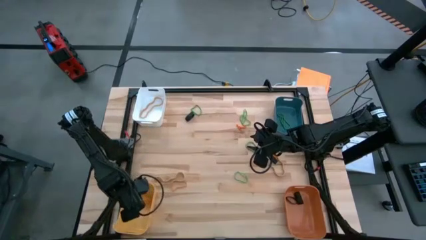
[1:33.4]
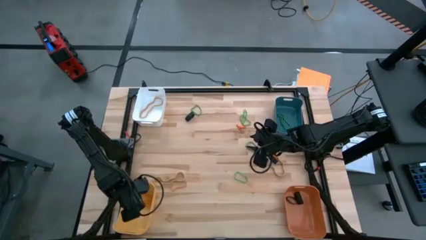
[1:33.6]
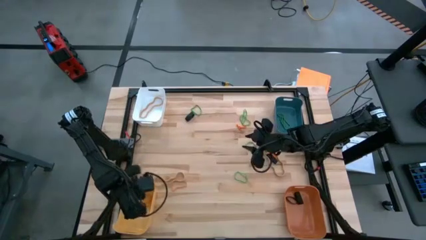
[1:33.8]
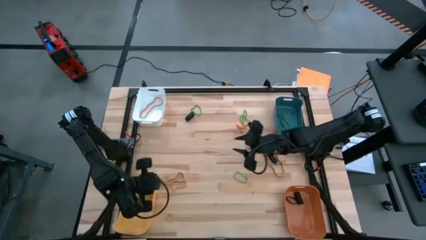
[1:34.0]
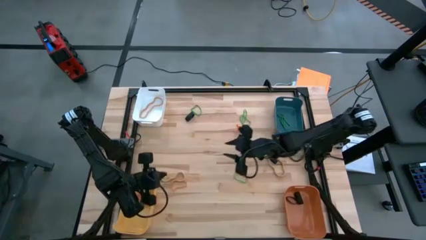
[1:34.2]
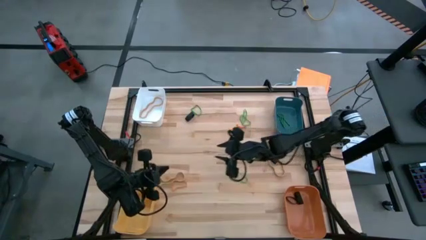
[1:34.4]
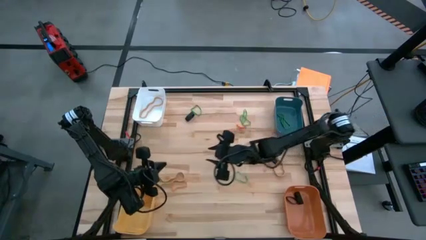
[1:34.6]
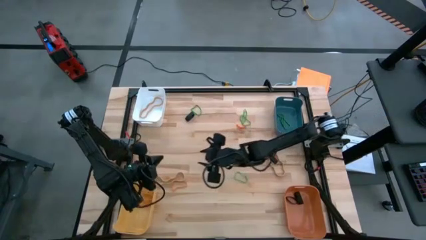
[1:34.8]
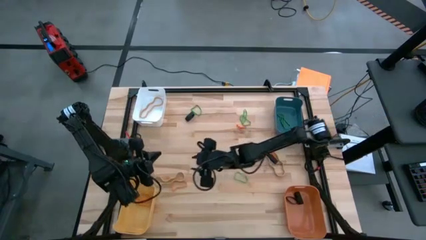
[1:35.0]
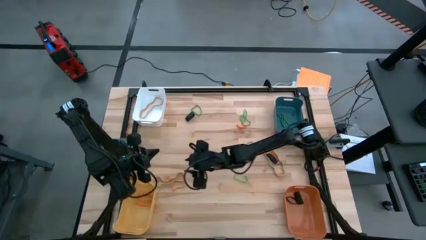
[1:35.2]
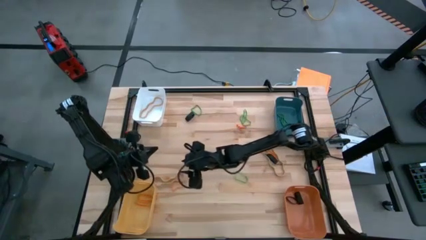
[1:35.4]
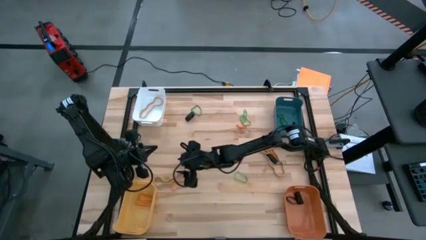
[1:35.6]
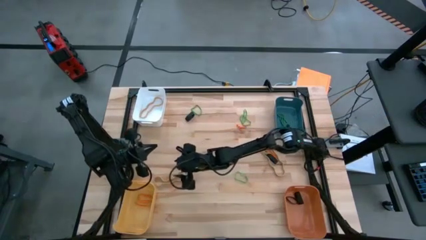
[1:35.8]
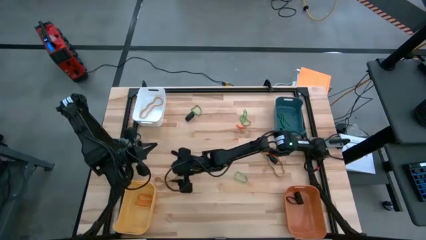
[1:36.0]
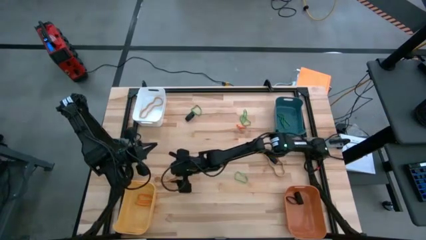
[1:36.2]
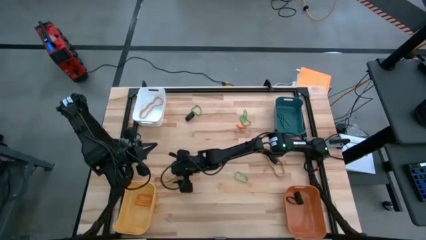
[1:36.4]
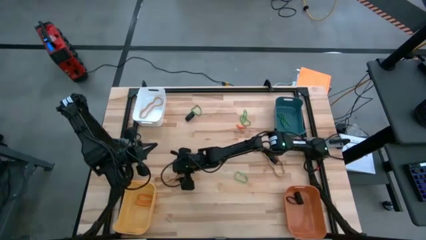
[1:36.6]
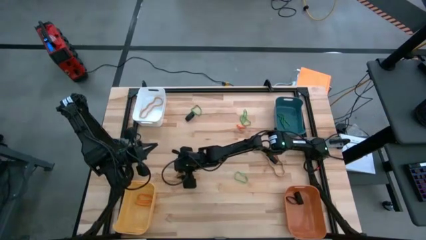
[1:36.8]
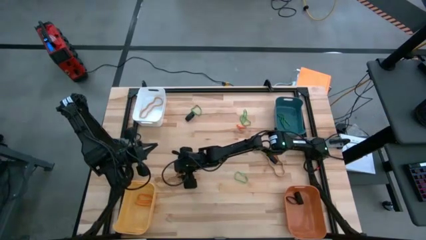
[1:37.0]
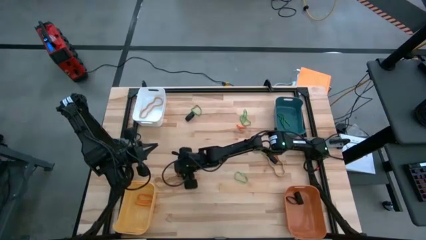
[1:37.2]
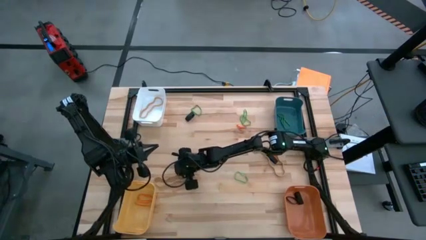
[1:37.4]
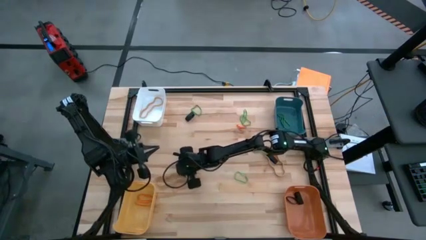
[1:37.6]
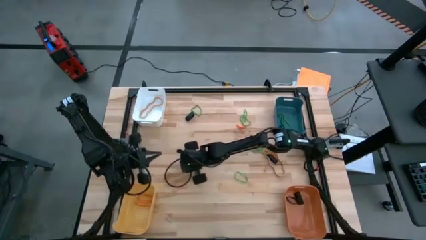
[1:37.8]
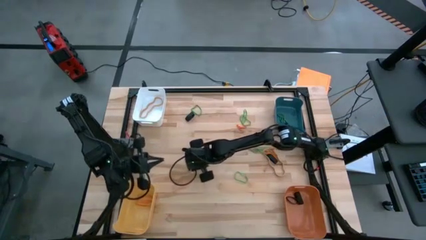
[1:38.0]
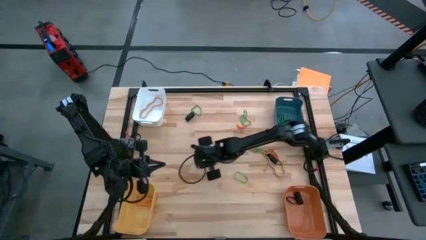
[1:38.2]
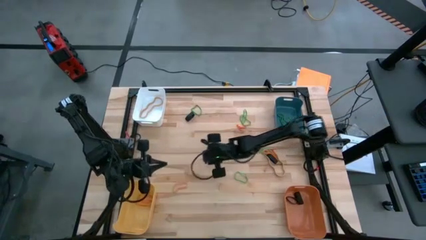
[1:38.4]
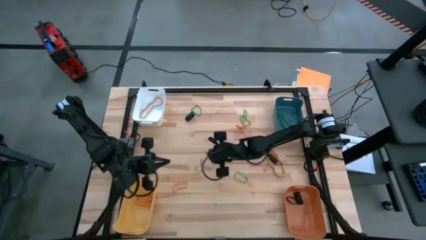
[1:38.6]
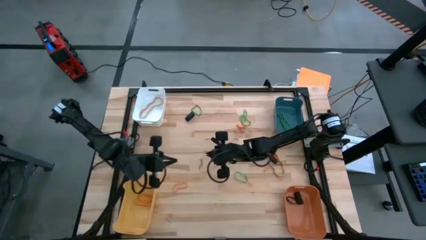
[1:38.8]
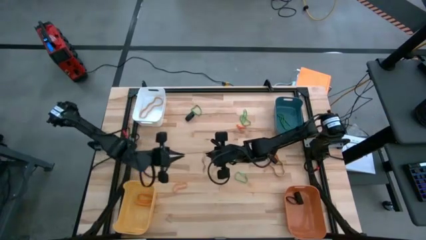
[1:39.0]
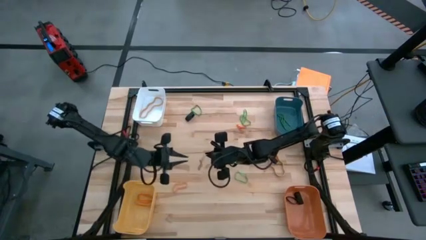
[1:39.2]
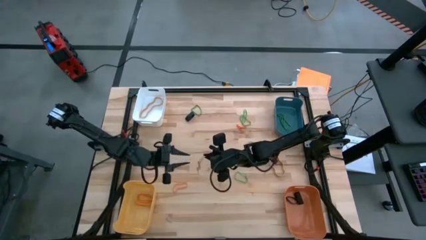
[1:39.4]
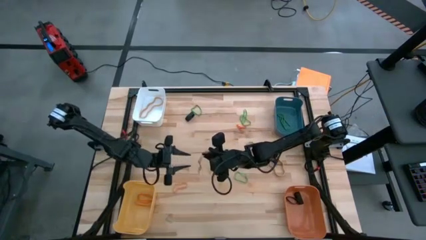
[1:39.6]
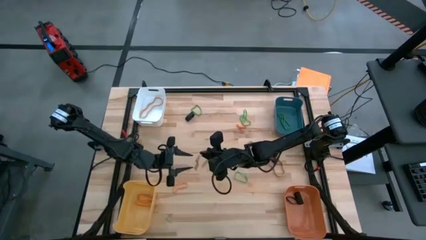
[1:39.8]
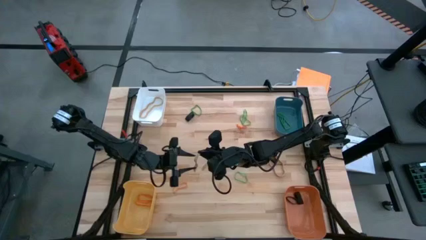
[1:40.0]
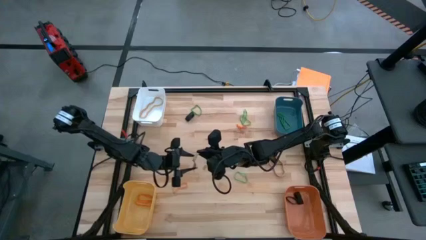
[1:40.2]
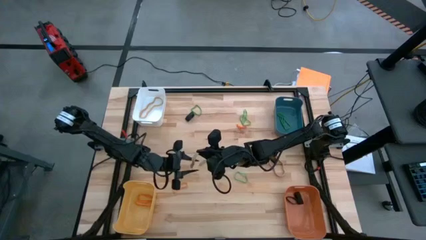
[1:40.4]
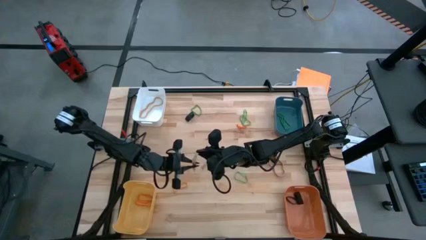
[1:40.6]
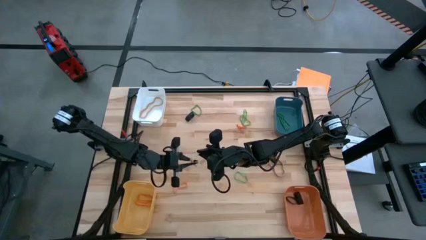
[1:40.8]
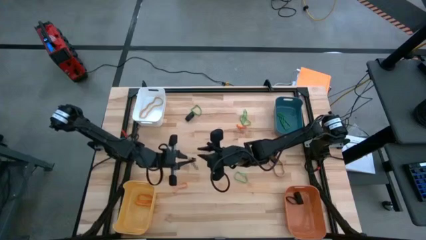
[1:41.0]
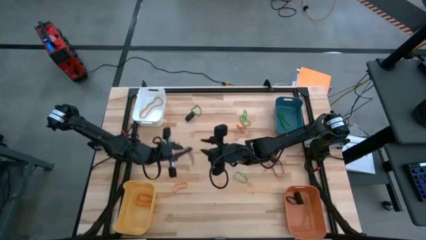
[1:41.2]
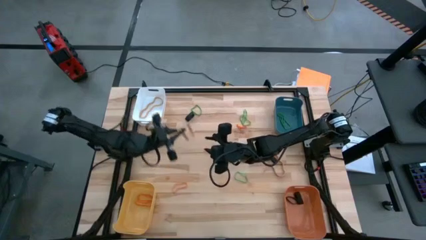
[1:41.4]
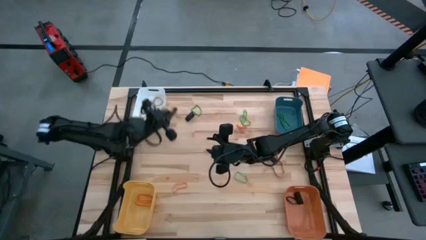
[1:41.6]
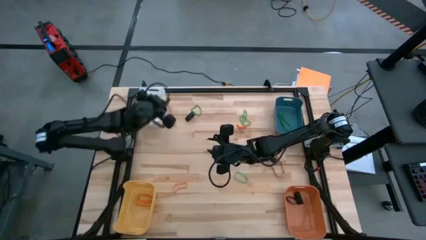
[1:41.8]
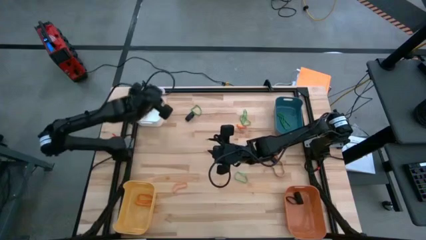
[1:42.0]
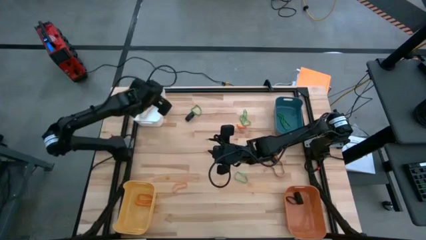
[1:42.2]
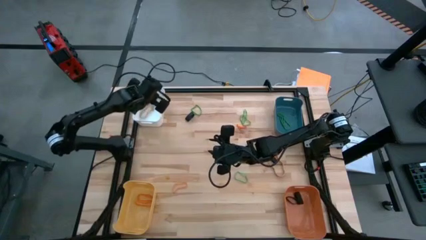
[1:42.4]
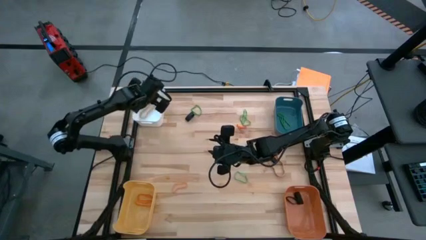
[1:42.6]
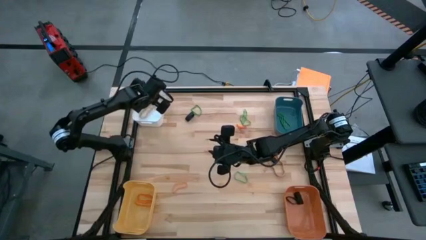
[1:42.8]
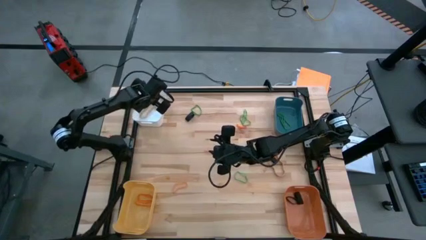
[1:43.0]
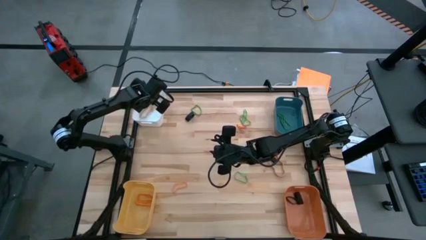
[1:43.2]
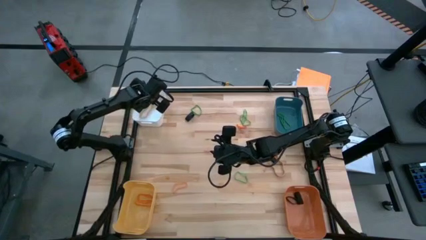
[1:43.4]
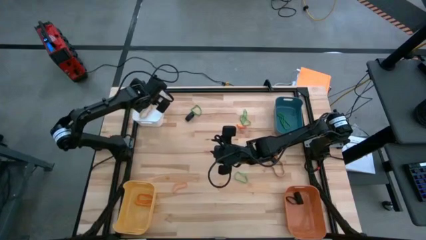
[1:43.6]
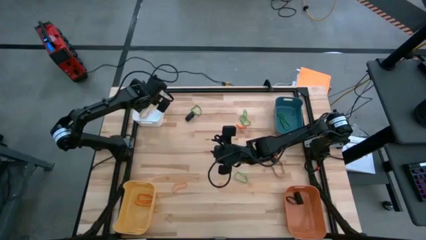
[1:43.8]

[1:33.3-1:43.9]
Task: Sort rubber bands into baskets
Put the brown rubber band into the white bin

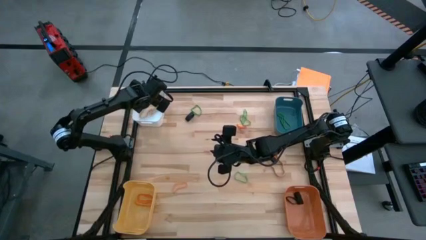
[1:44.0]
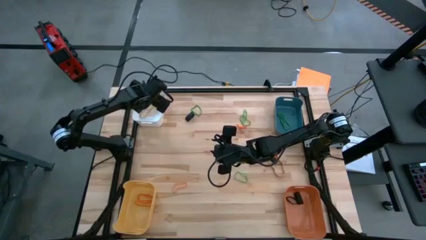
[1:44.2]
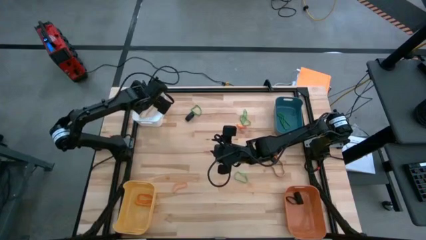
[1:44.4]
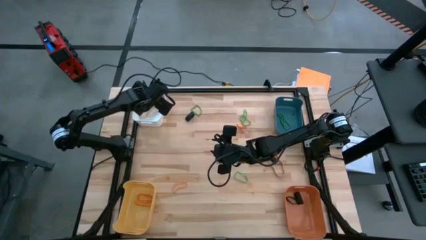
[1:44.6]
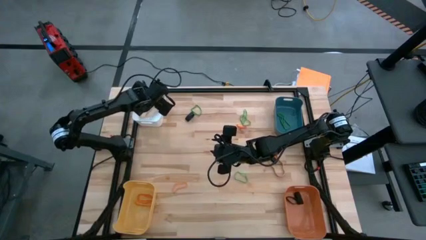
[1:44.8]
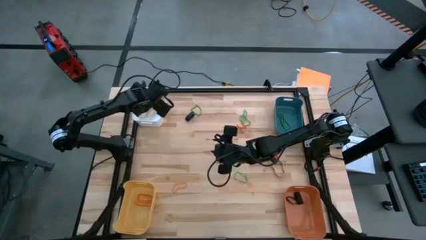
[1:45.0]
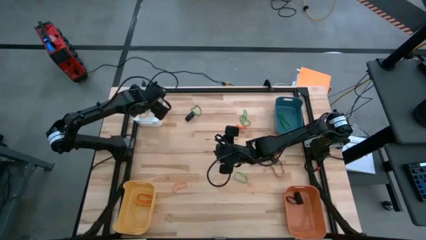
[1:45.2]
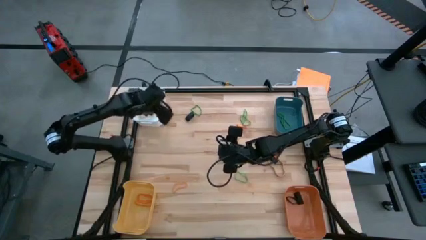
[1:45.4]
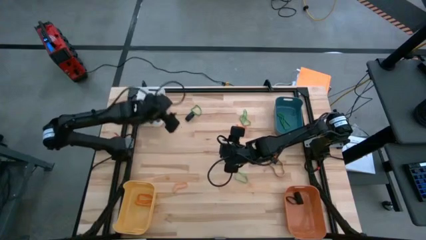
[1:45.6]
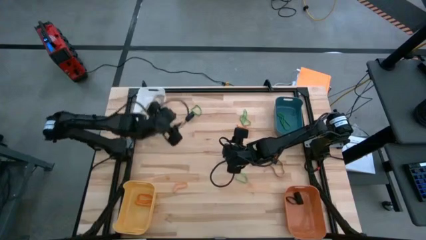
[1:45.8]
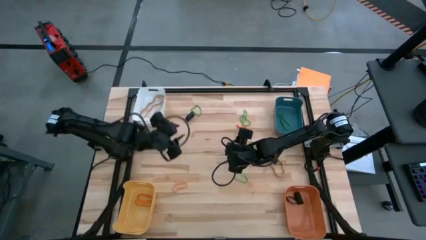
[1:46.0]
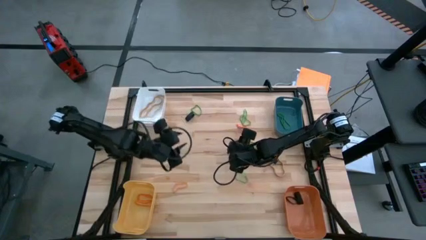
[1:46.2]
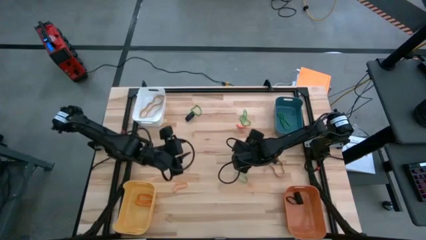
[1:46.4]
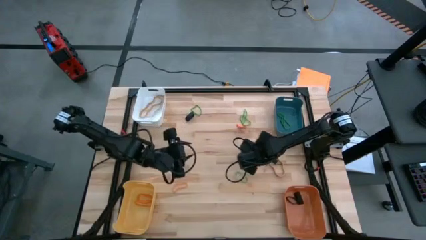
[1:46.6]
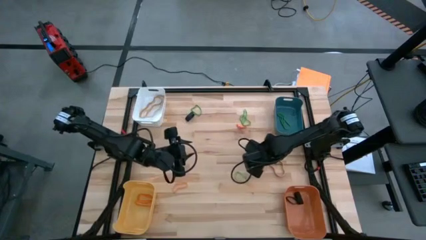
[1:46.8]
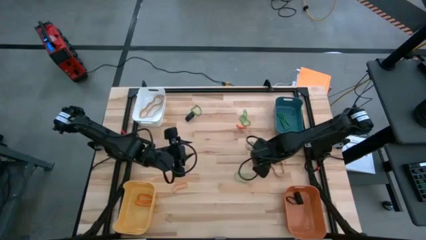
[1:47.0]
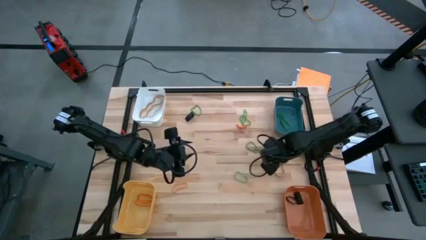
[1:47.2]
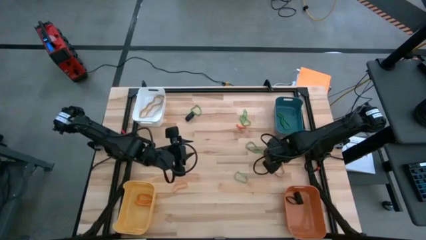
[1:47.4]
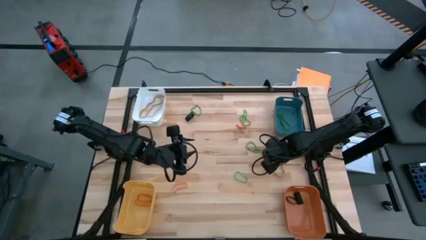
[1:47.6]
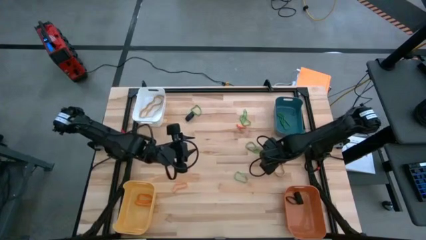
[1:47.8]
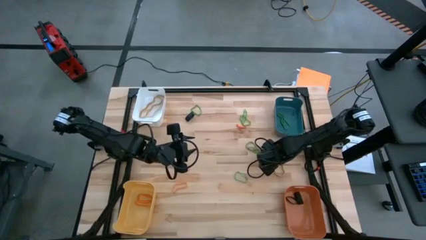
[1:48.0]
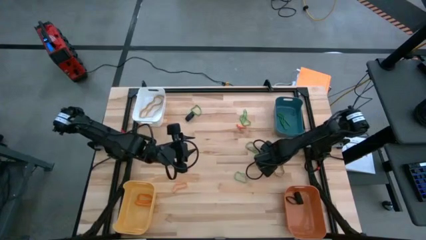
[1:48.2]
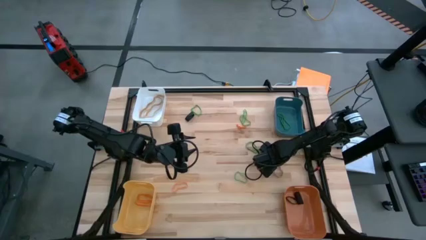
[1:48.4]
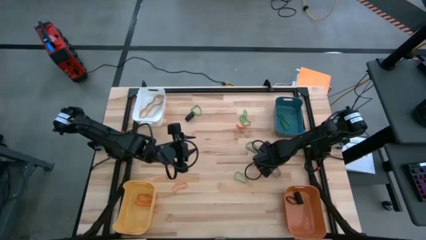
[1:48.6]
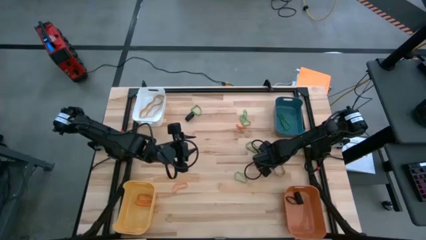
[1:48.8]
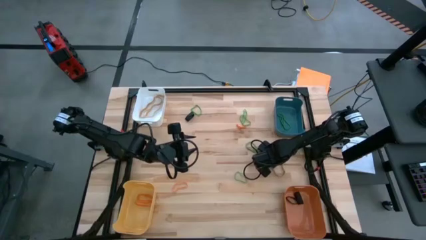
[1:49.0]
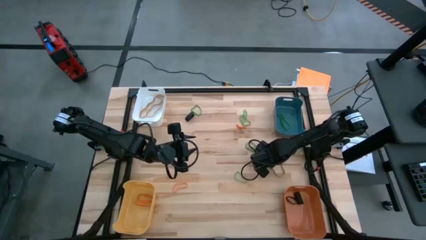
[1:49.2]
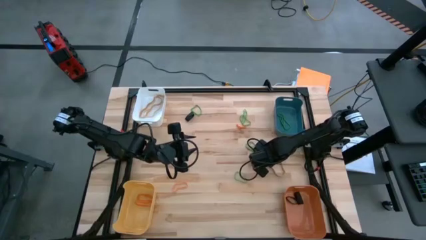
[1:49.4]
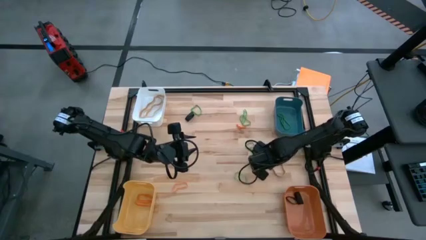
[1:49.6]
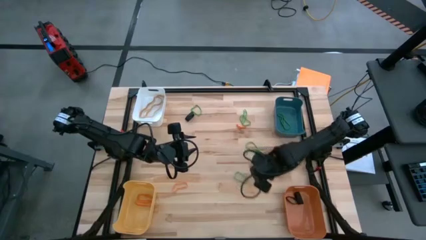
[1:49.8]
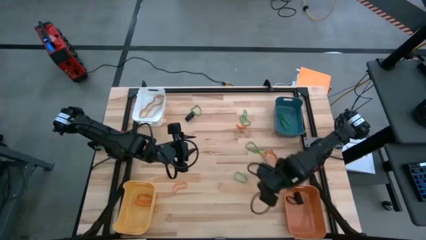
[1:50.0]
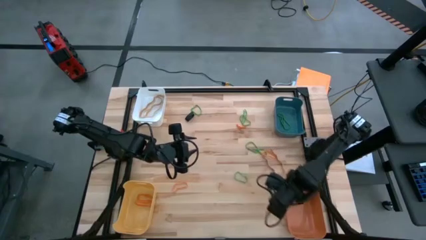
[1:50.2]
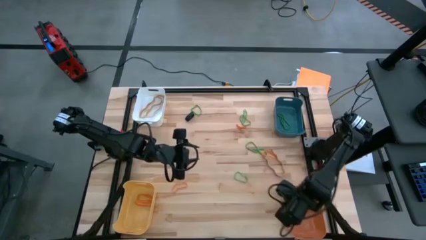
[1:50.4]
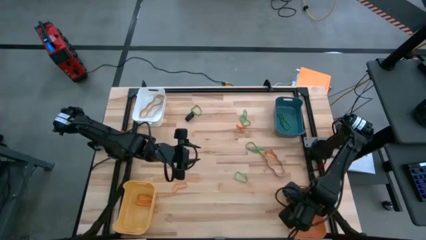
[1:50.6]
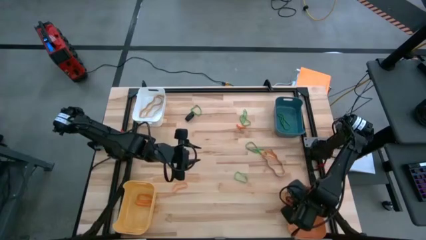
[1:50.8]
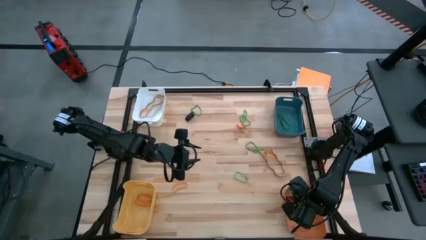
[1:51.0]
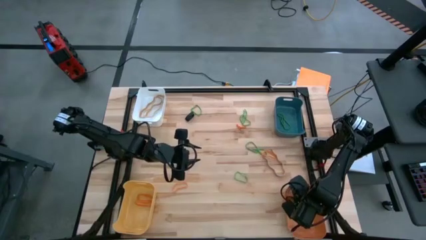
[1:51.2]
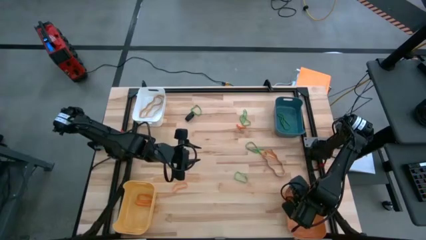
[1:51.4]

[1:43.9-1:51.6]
Put the black rubber band into the orange bin
